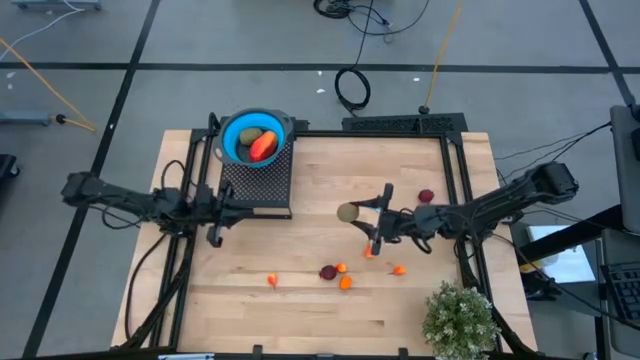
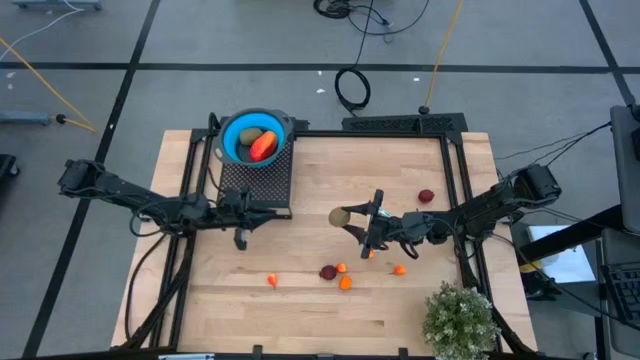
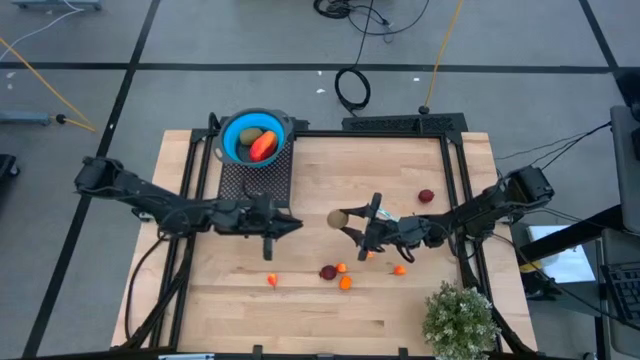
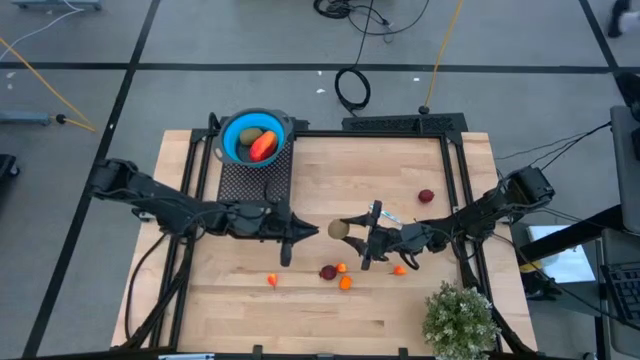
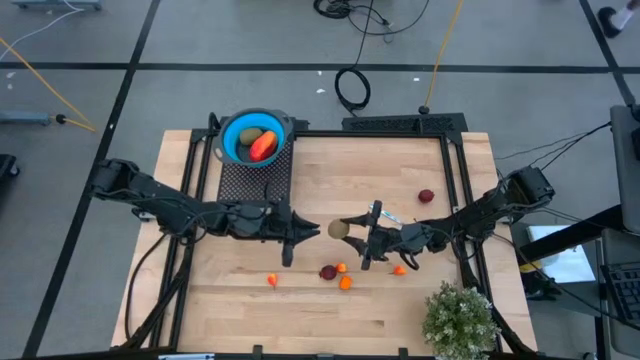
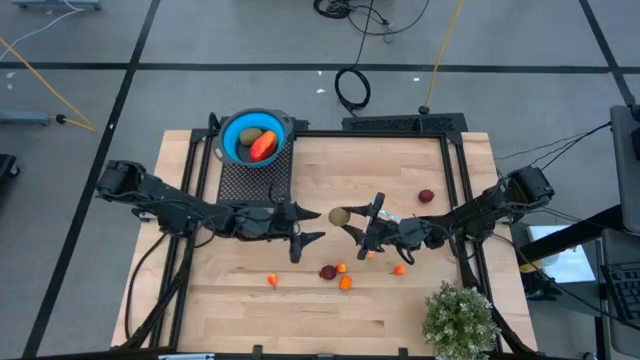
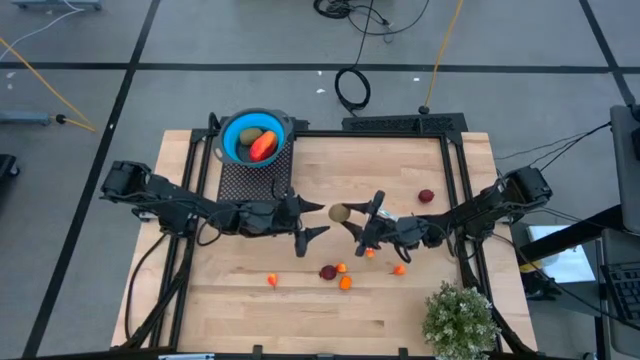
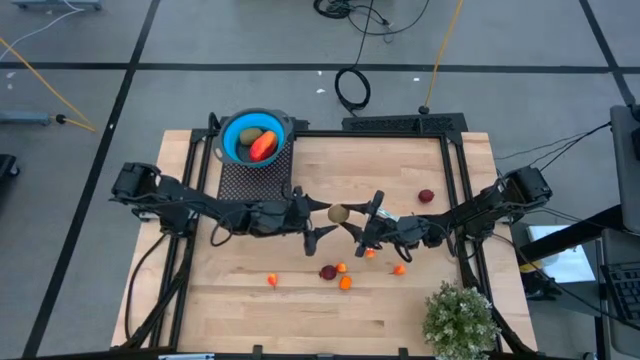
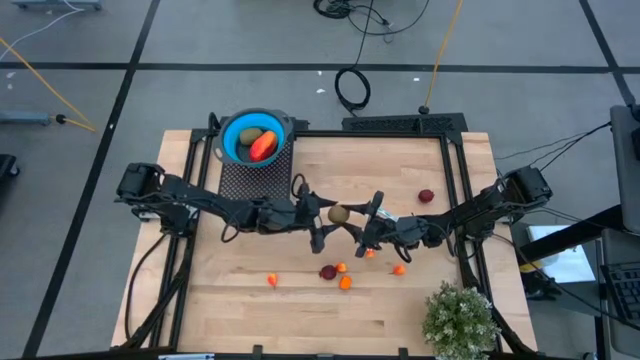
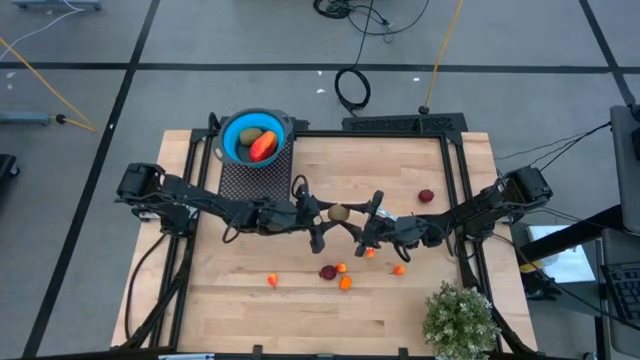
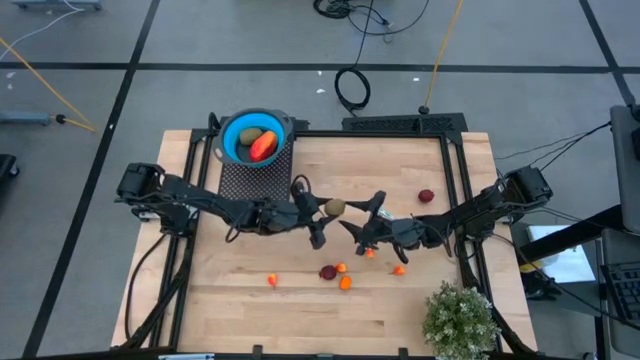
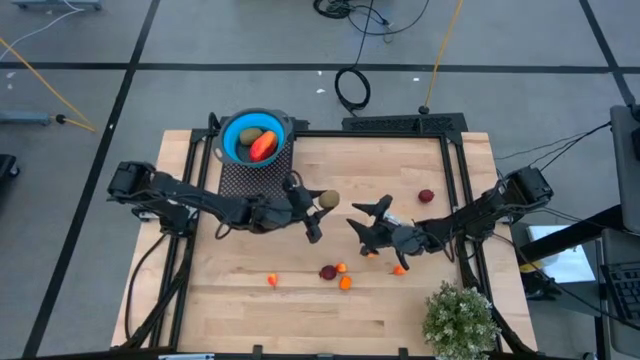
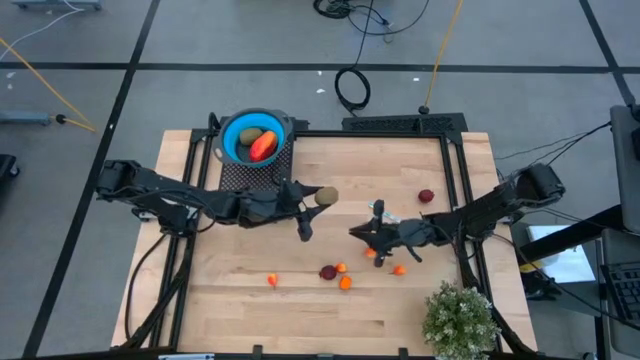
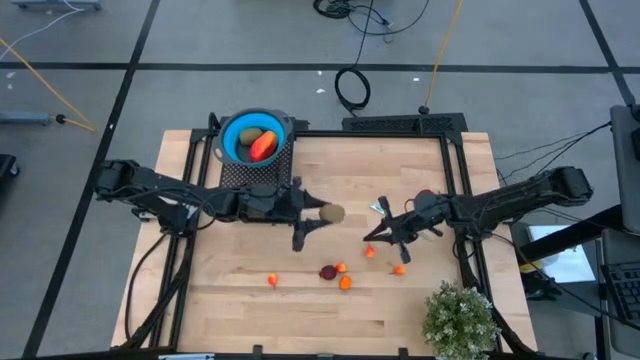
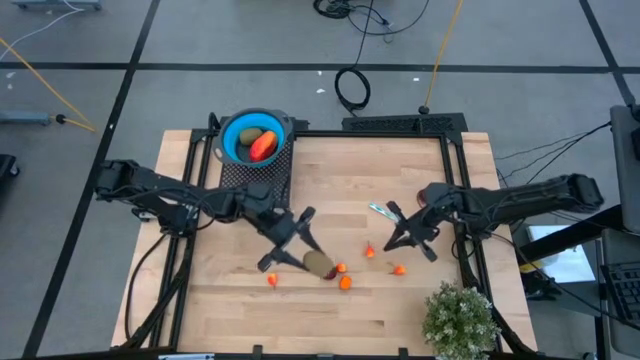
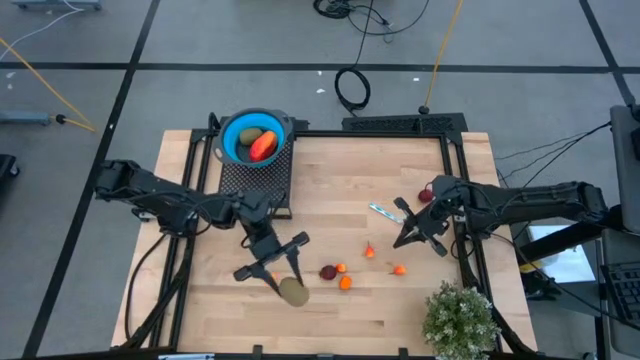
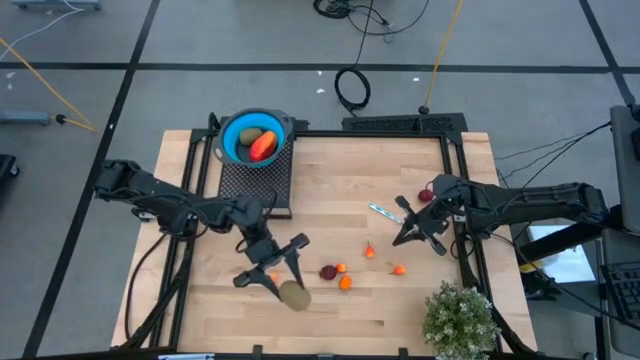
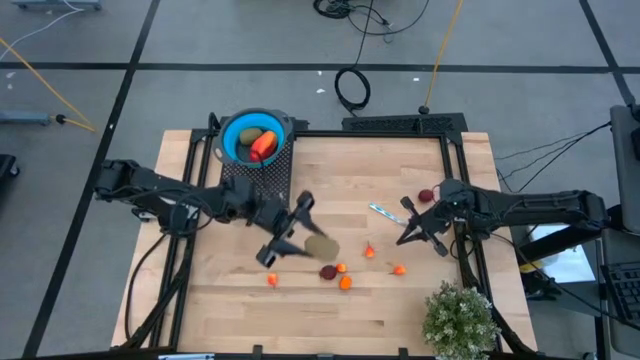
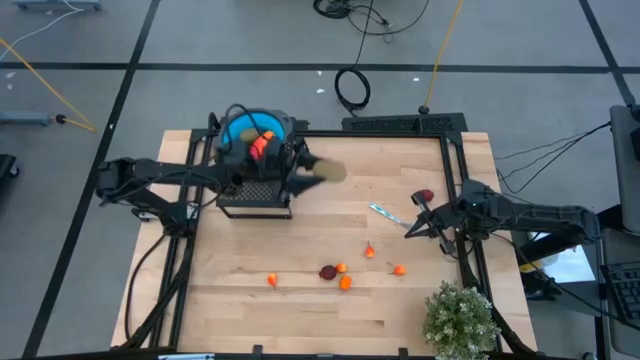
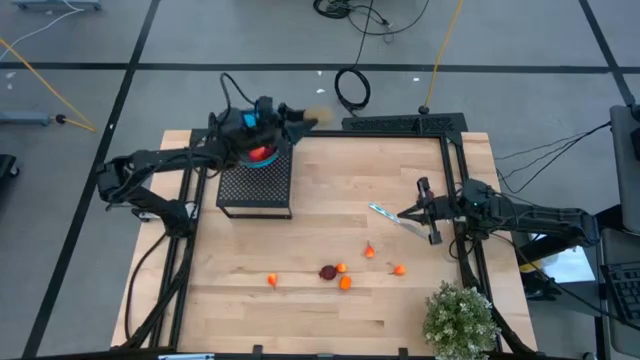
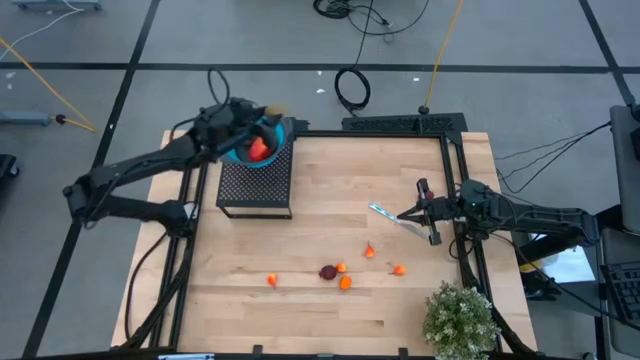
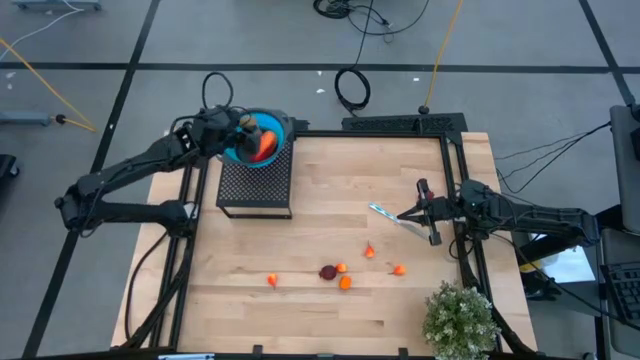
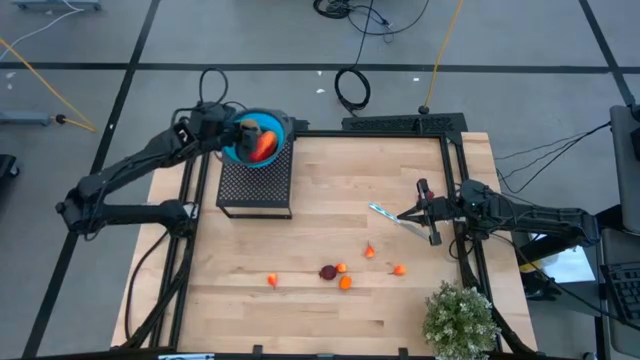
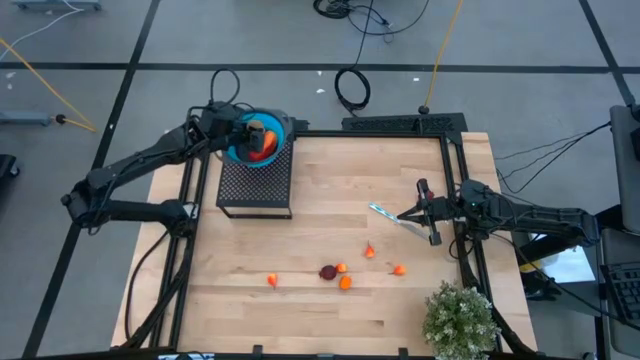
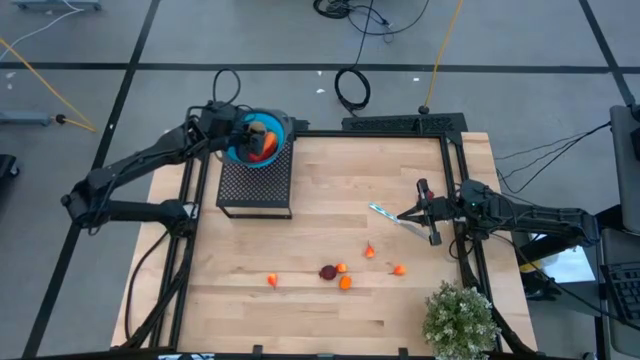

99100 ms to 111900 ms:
Task: Pick & Place Fruit
Put the brown kiwi into the blue strainer bowl on the shelf

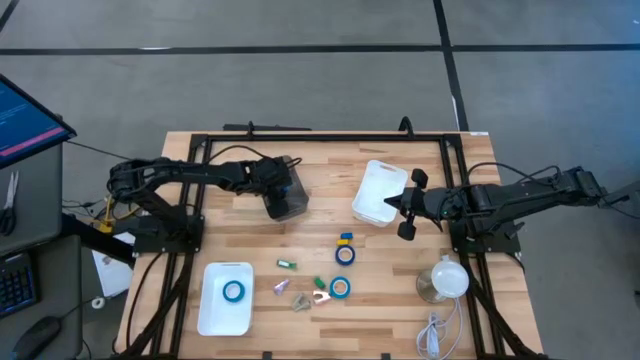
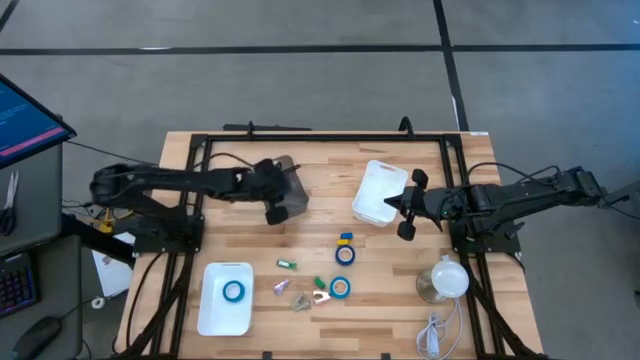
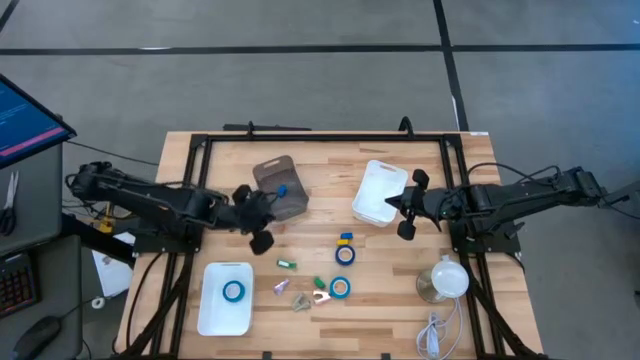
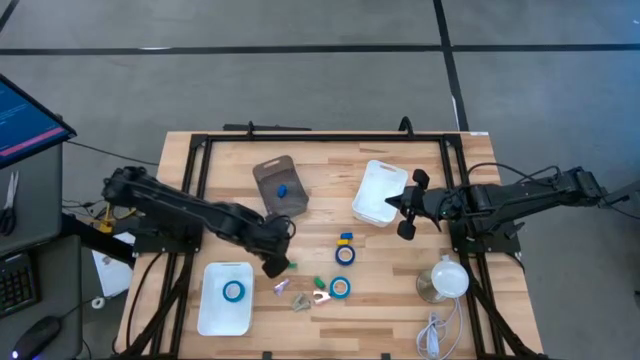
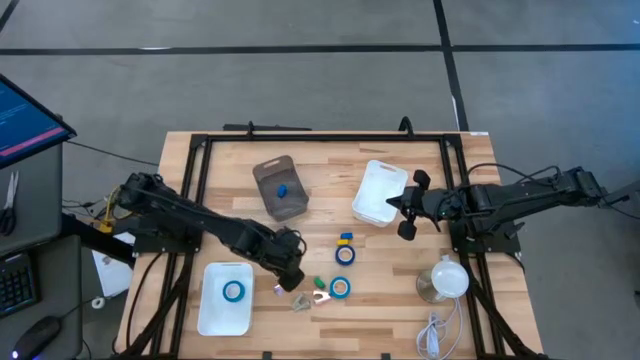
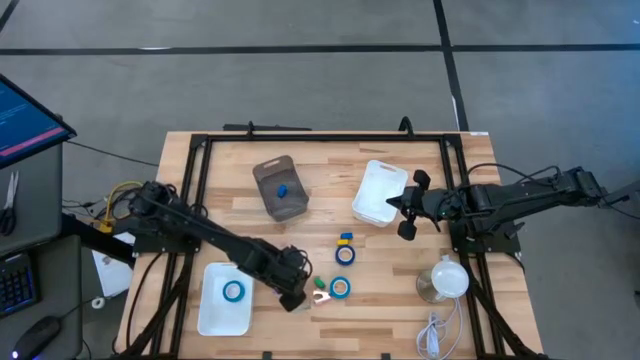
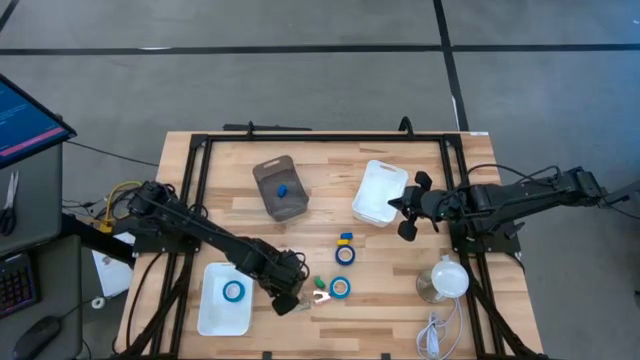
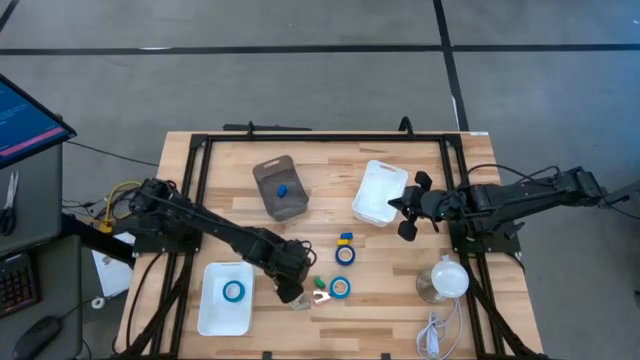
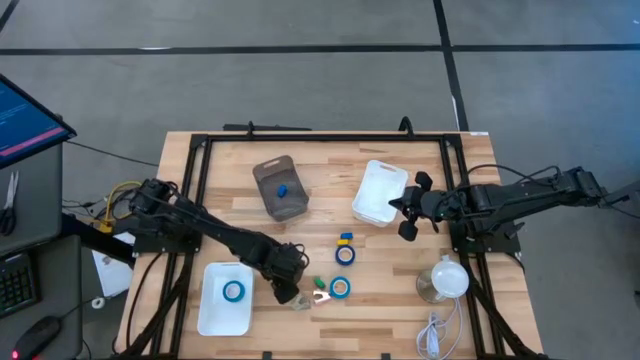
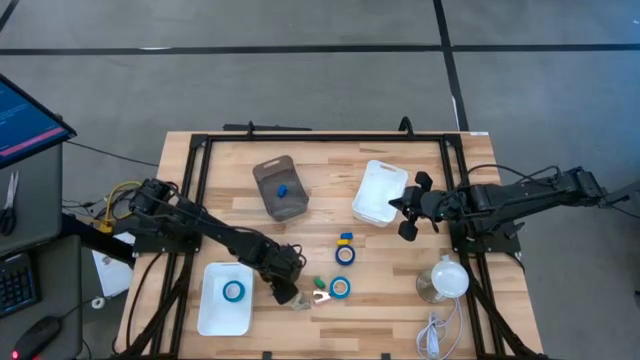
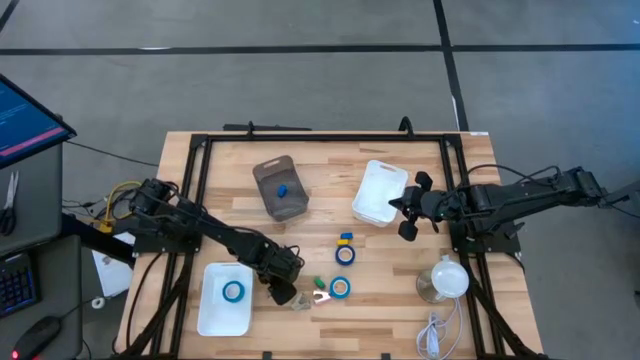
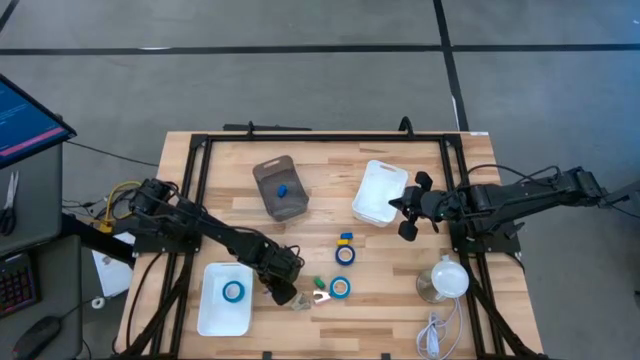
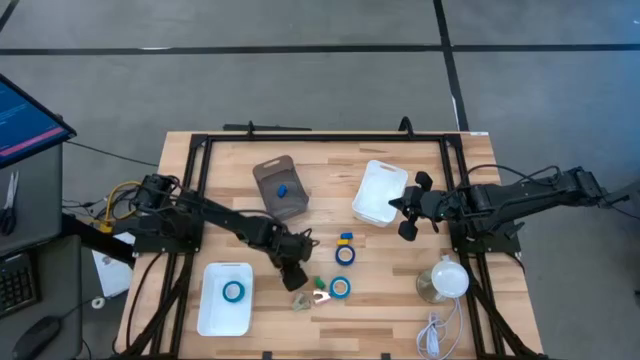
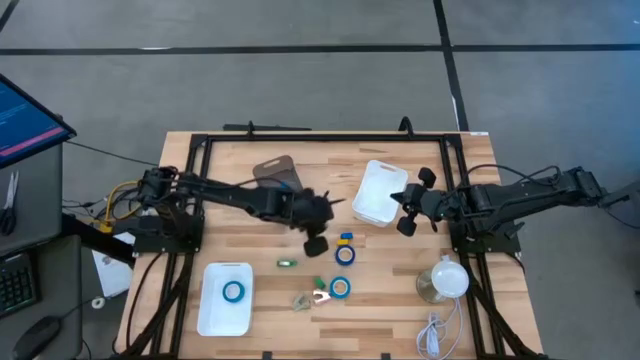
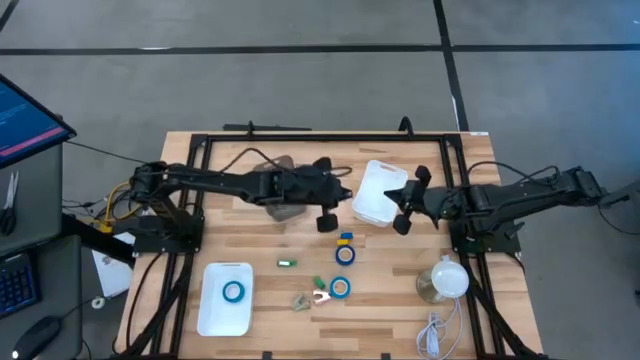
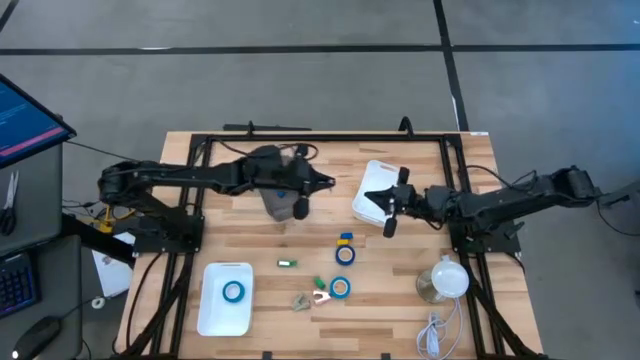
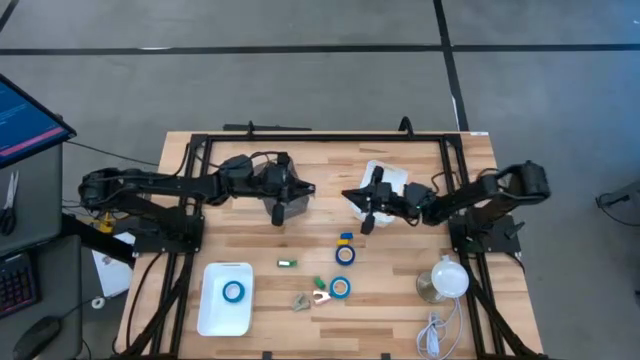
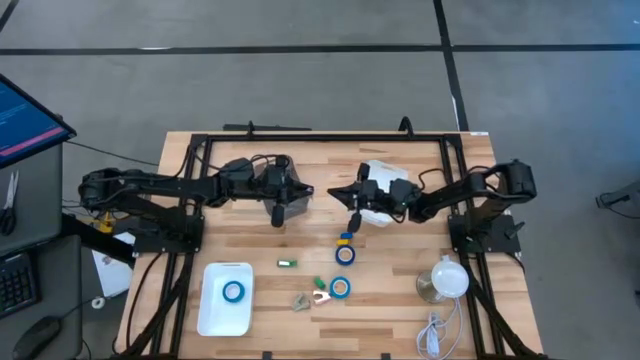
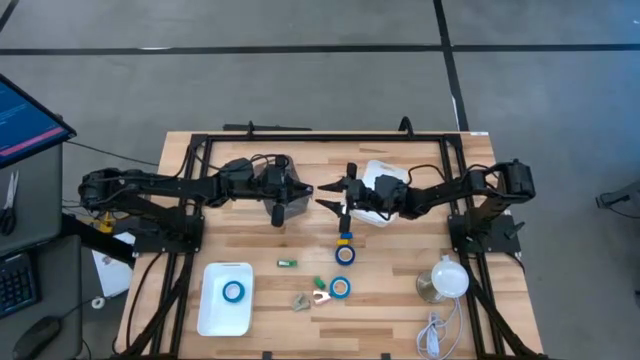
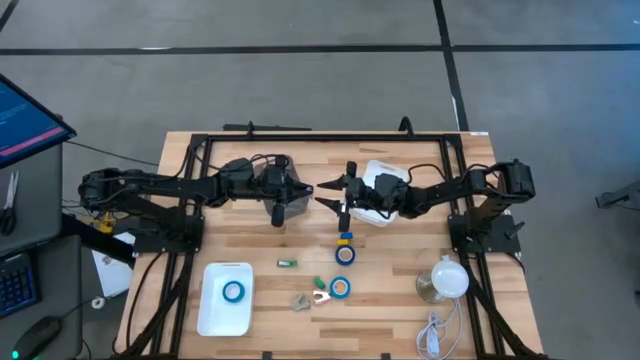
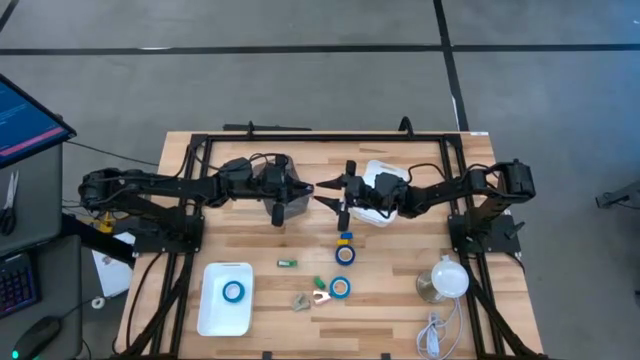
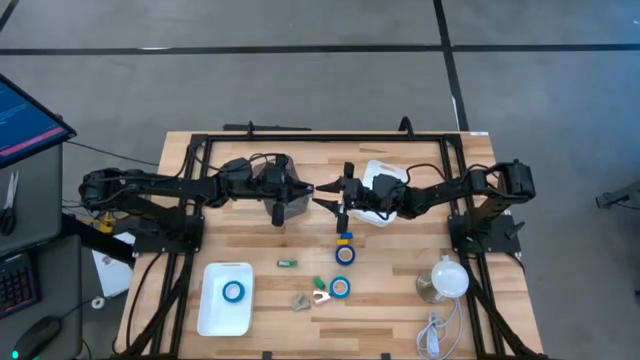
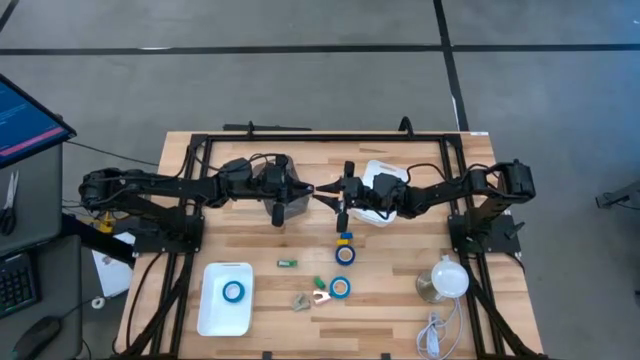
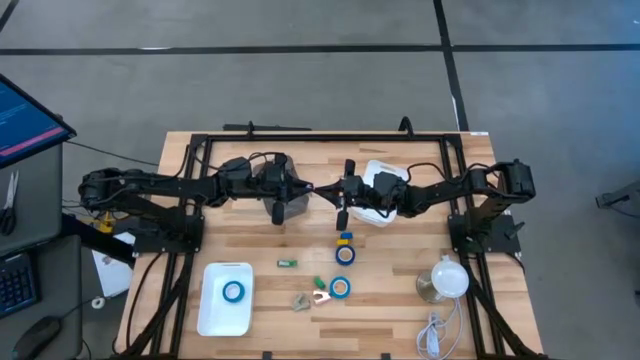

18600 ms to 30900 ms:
Task: Pick and place Stapler, Stapler remover, tape
Put the purple stapler remover into the top white bin
